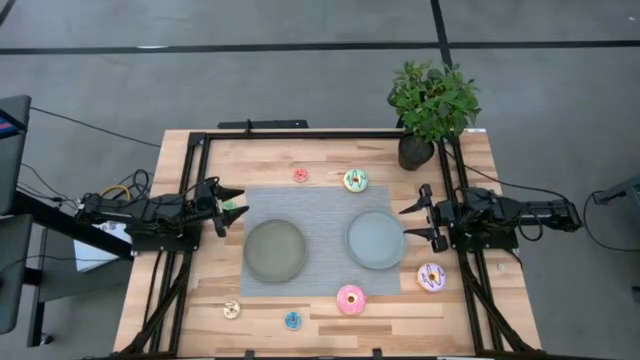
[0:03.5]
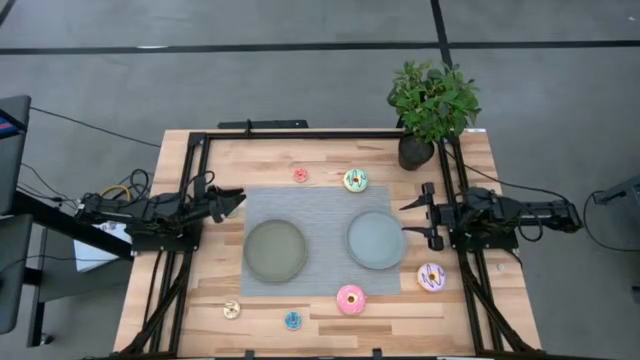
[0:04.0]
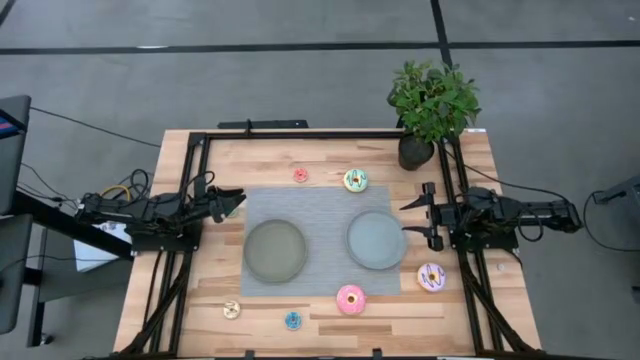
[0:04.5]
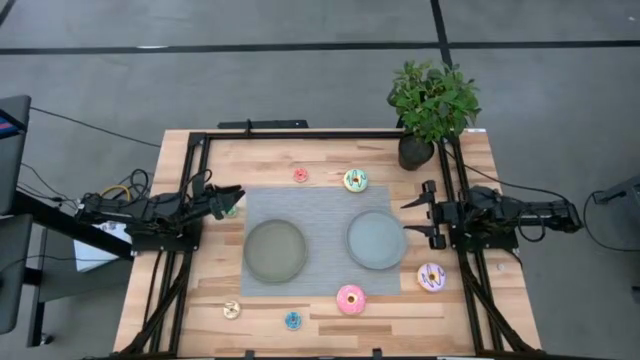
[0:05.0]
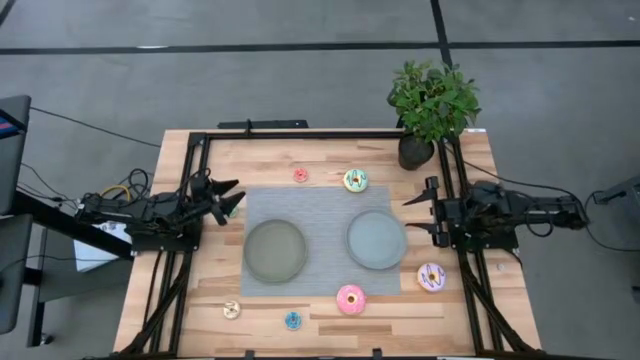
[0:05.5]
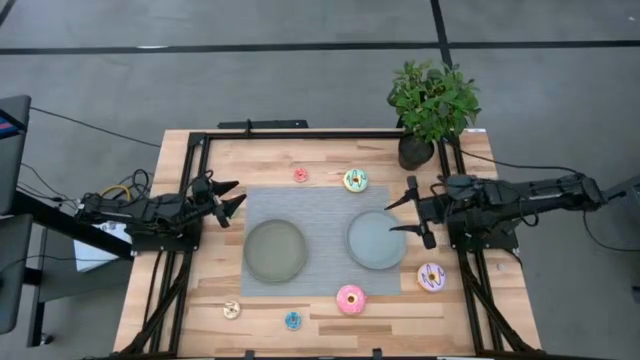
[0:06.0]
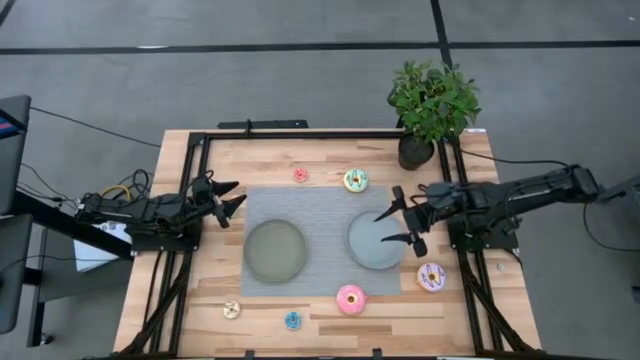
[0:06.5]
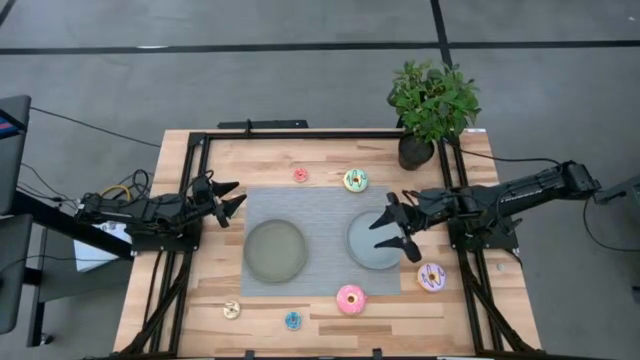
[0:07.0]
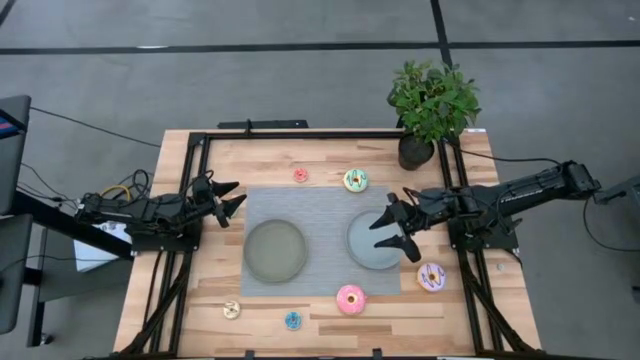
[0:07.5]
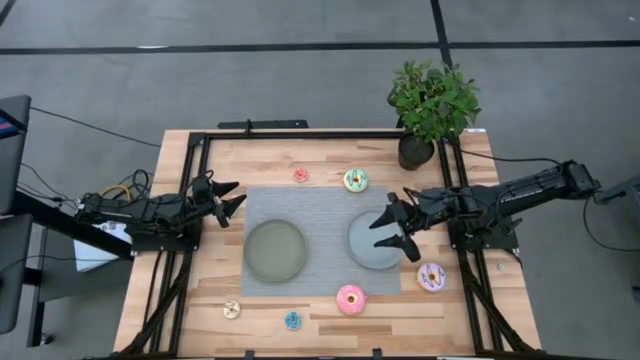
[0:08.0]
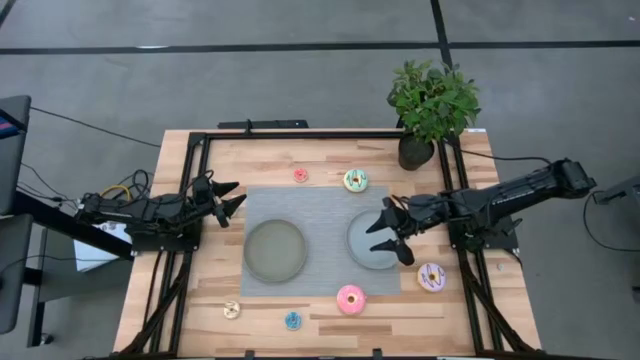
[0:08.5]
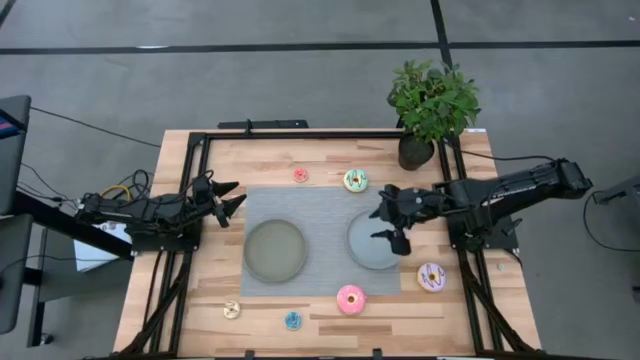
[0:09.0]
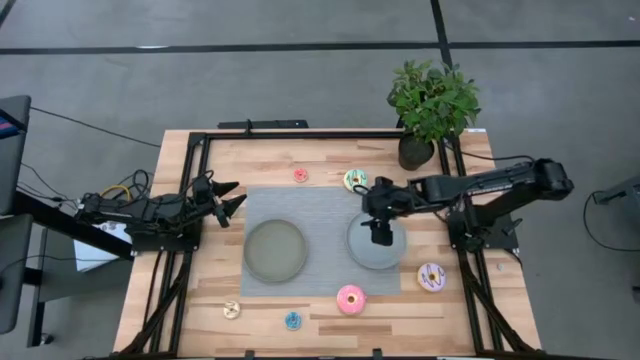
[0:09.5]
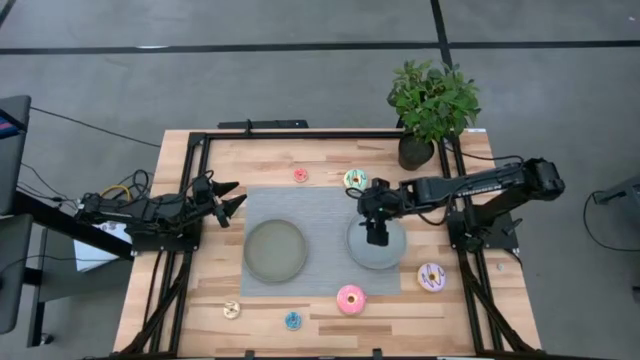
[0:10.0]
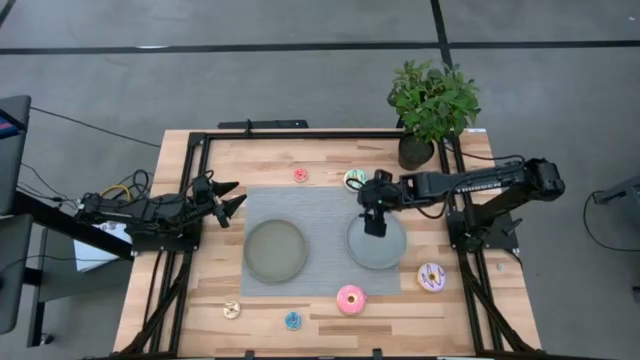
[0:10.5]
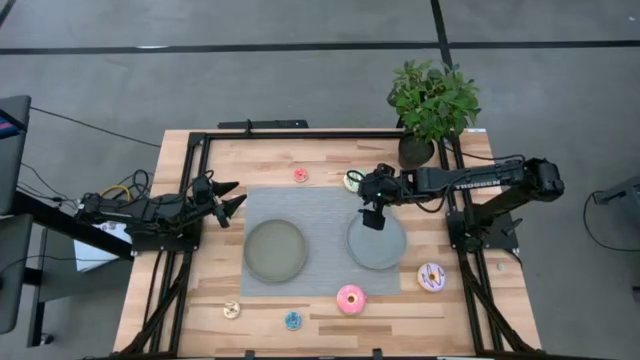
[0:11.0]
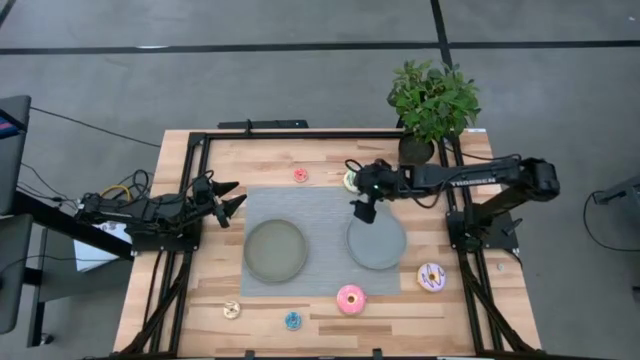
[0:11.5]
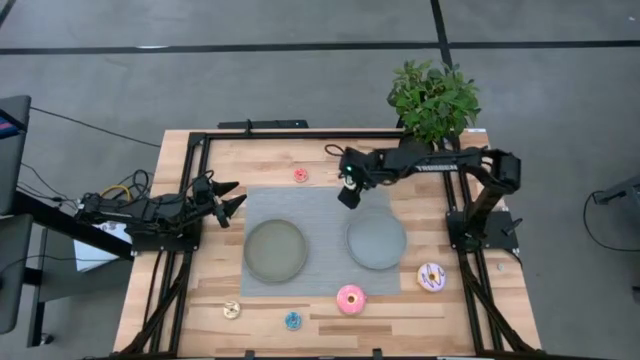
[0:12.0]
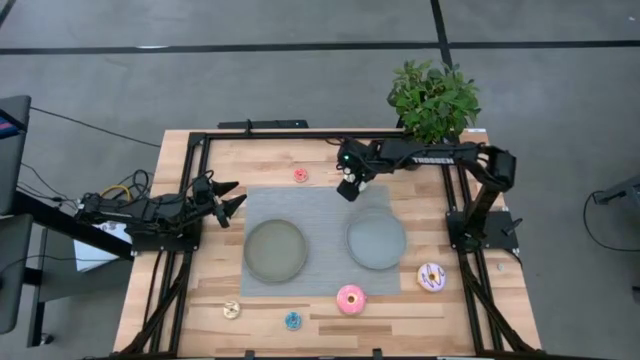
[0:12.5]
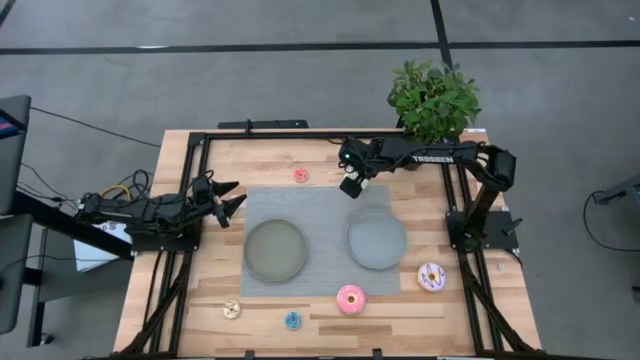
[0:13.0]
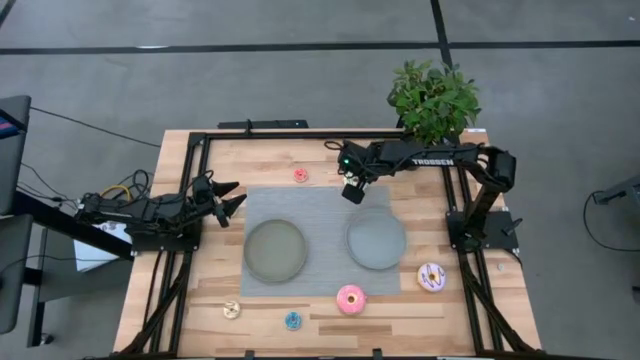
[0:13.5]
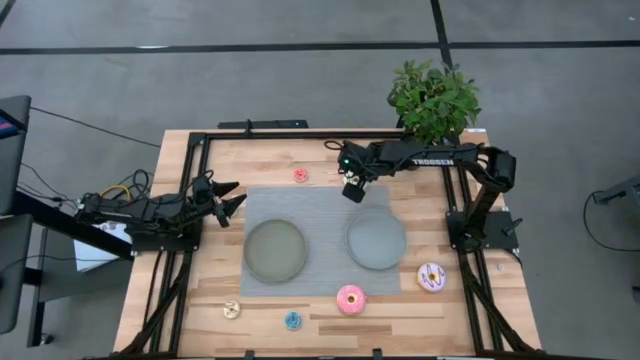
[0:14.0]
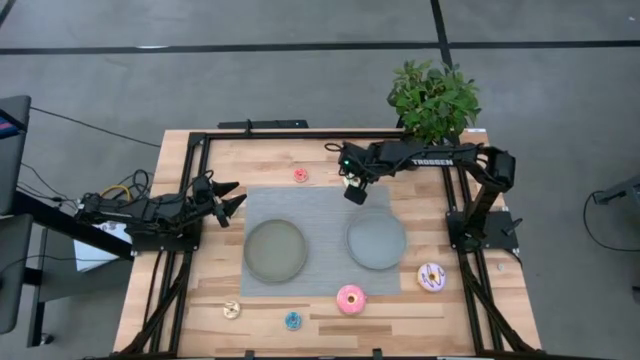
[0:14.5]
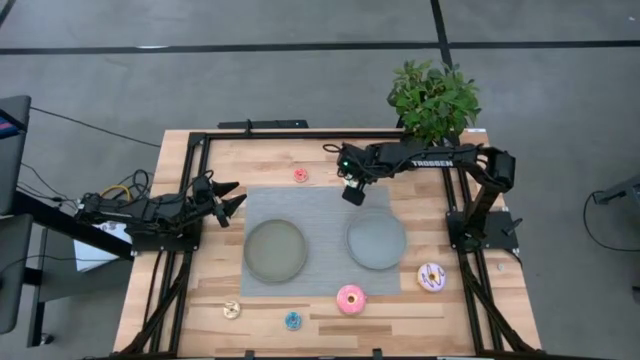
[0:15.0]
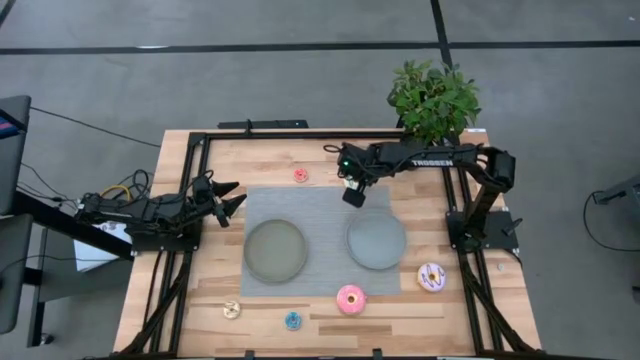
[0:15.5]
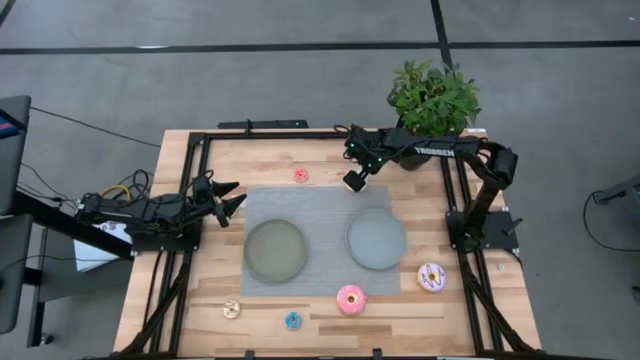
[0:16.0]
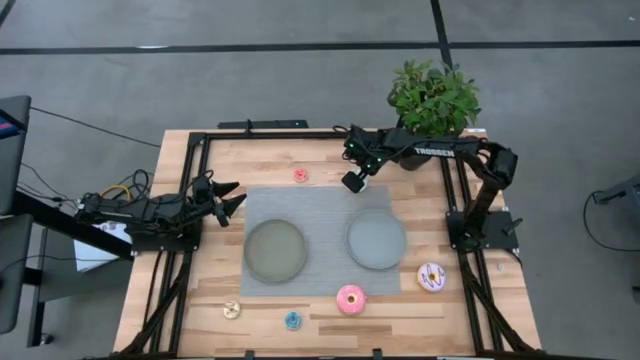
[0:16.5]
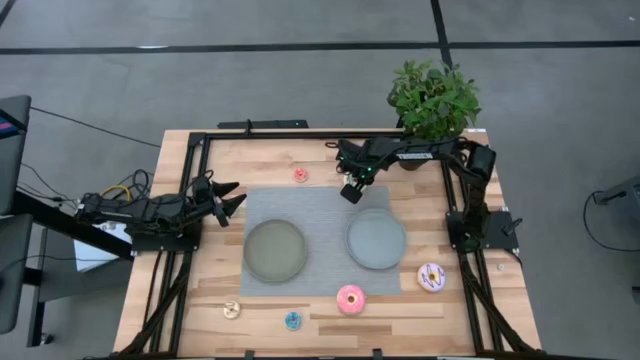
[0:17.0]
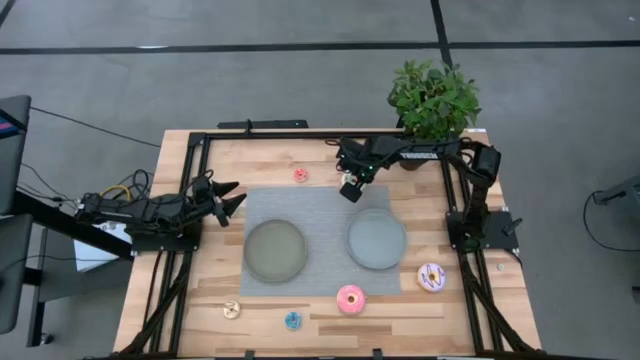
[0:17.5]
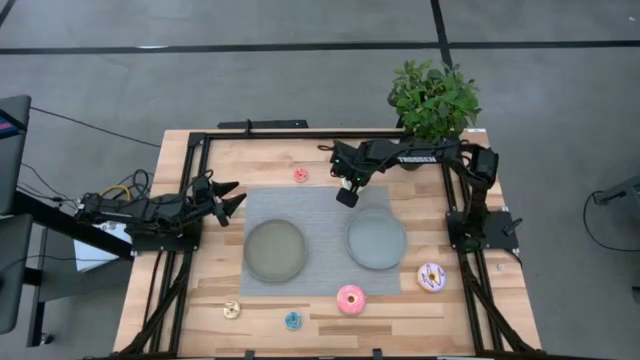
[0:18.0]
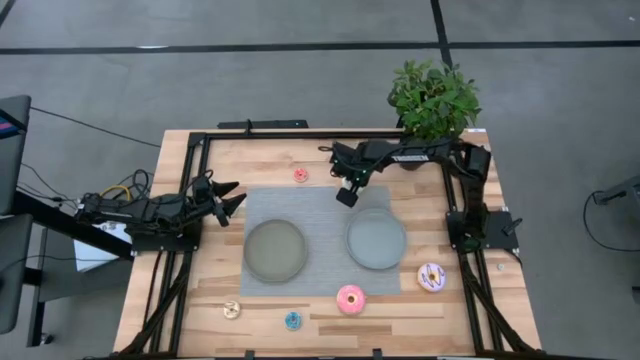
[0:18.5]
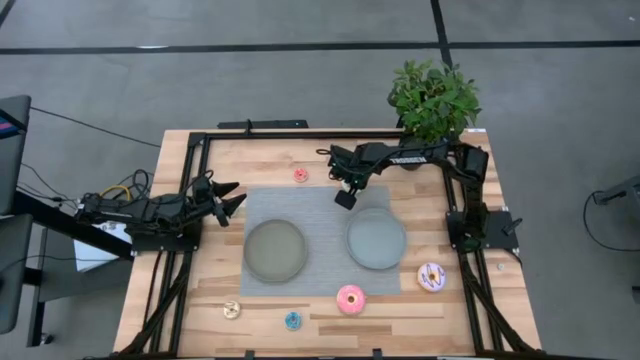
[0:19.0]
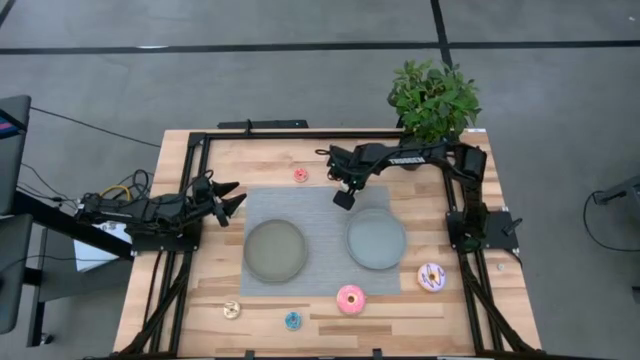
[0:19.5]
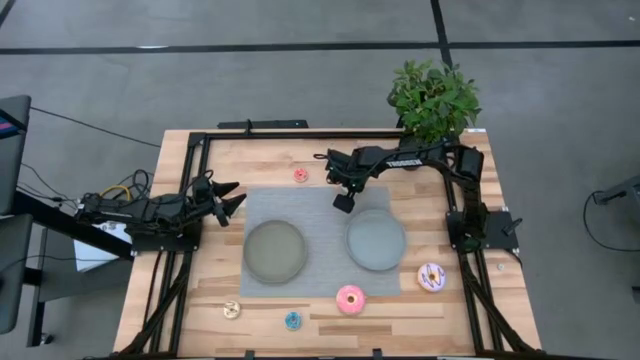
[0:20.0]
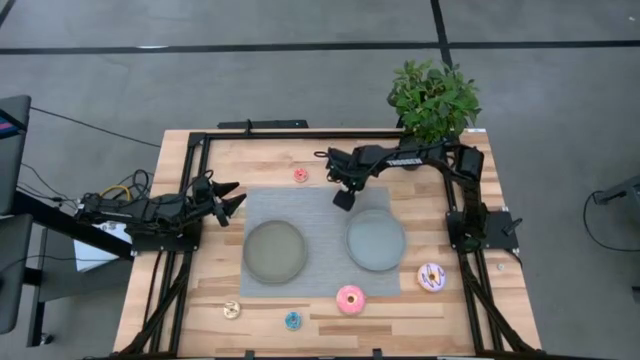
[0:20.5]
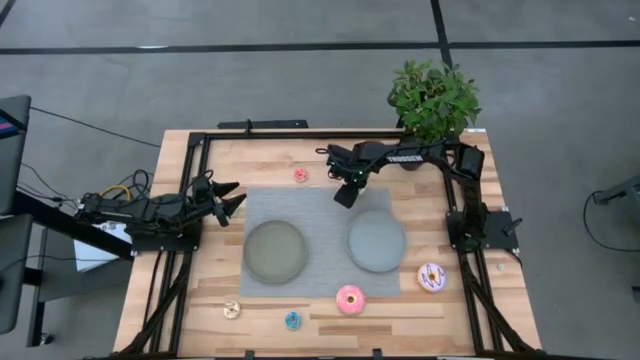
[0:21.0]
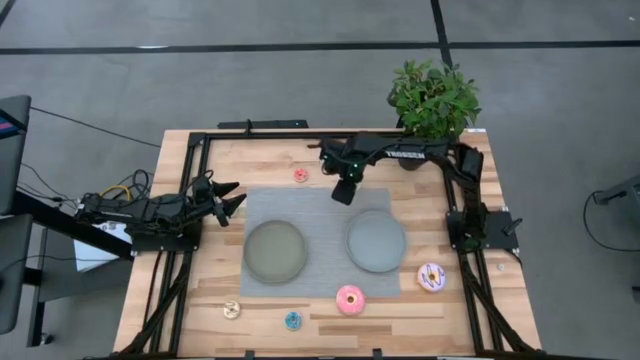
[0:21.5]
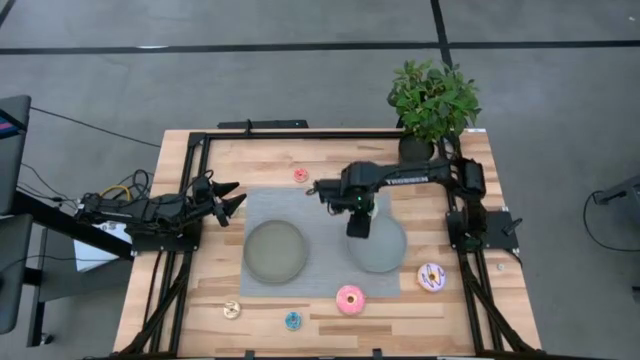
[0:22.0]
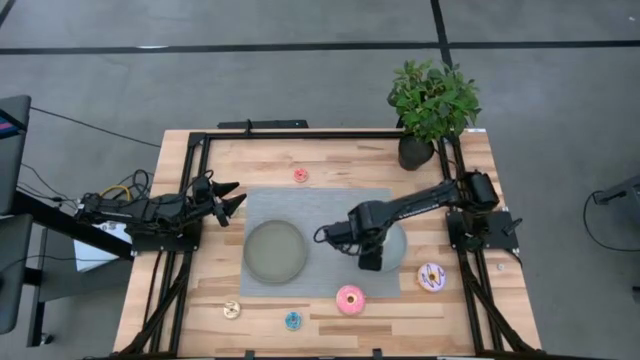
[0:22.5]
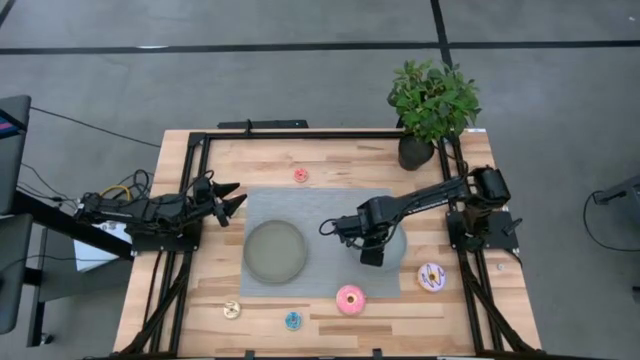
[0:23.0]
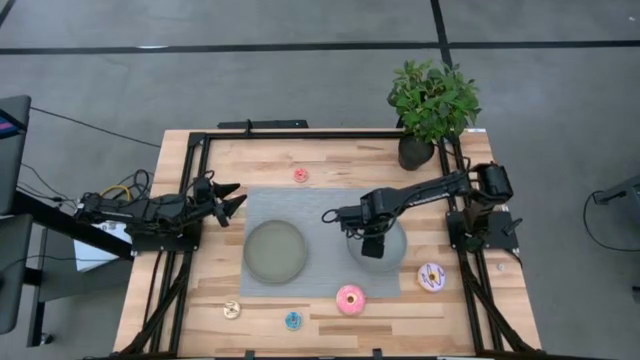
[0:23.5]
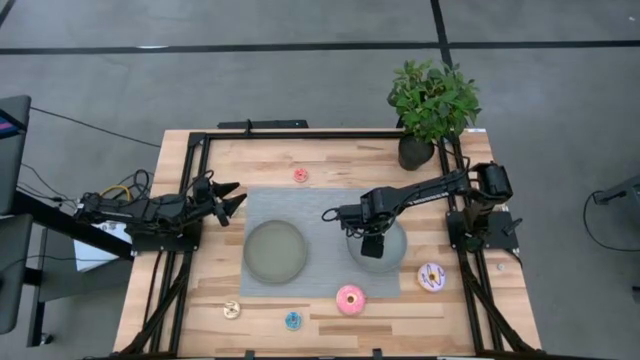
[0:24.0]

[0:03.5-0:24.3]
Task: Pick & Place donuts
Put the large blue donut on the gray plate
